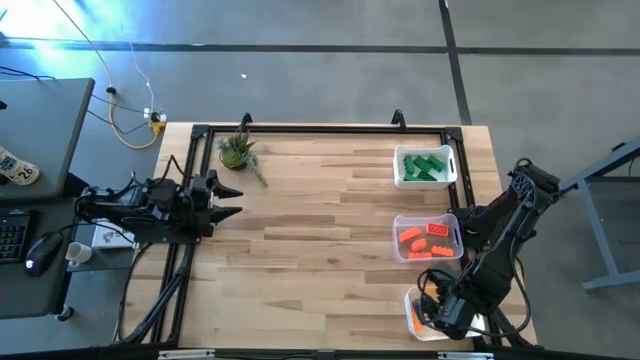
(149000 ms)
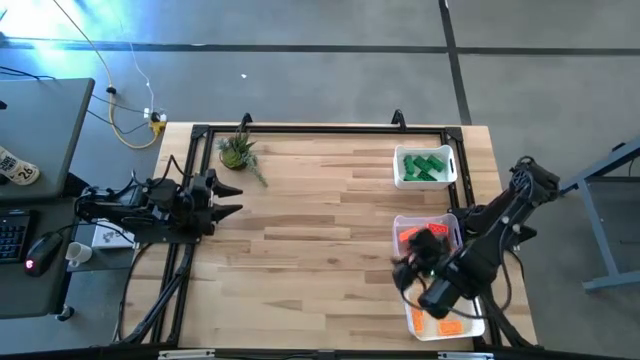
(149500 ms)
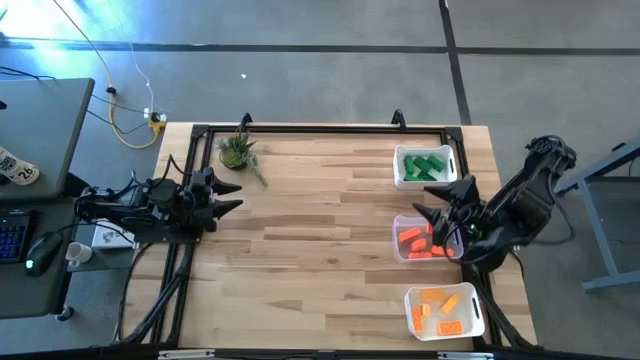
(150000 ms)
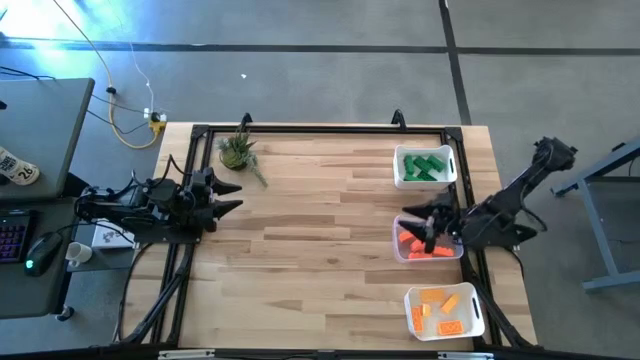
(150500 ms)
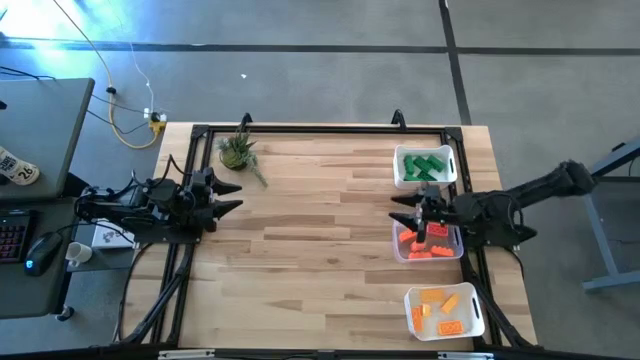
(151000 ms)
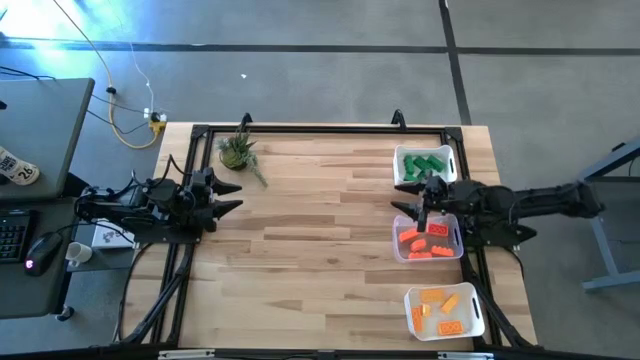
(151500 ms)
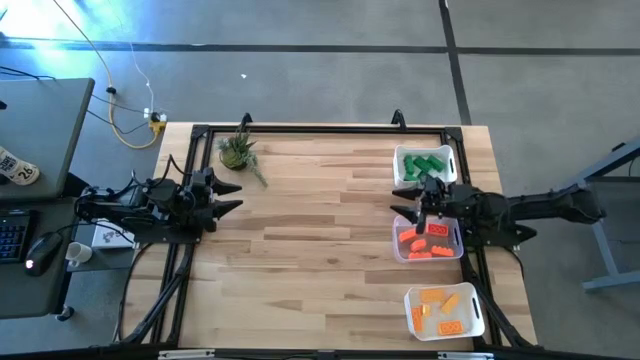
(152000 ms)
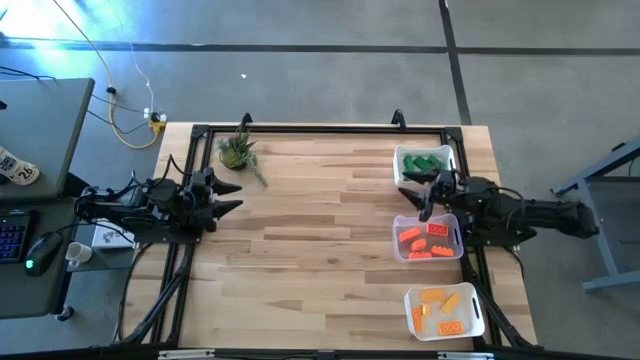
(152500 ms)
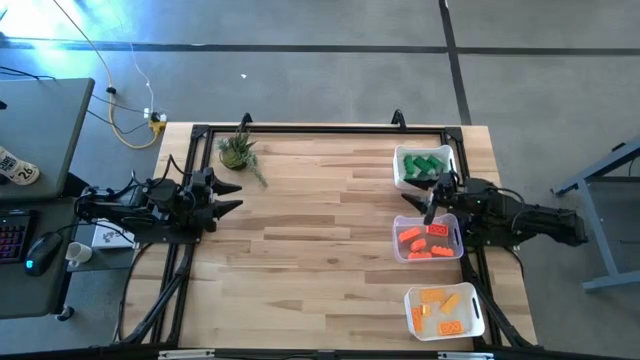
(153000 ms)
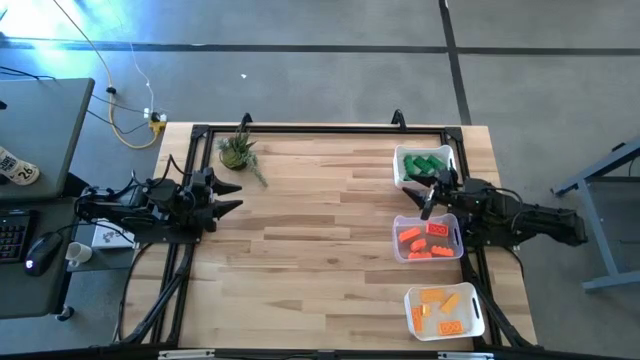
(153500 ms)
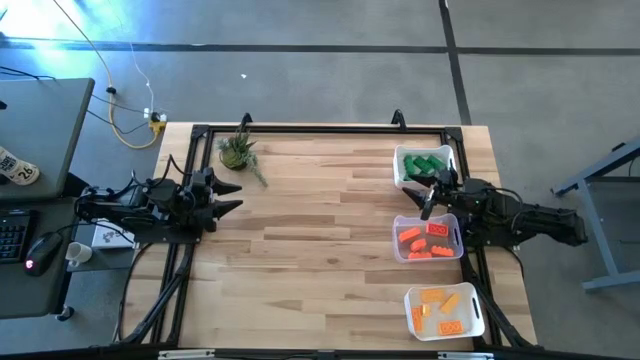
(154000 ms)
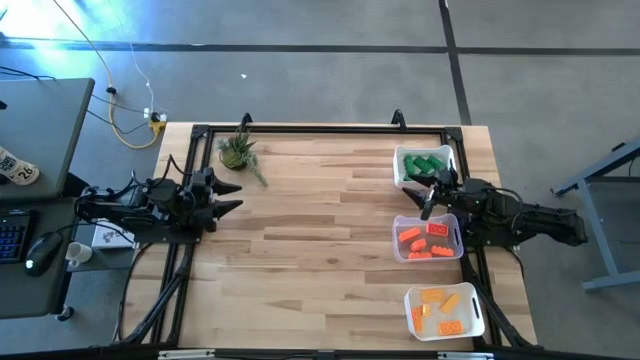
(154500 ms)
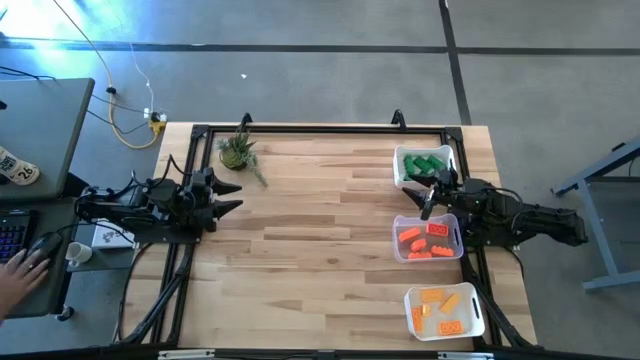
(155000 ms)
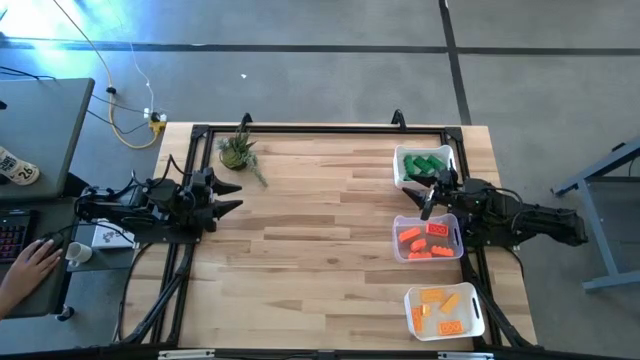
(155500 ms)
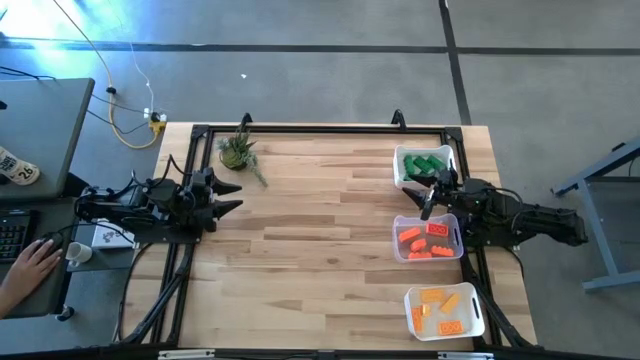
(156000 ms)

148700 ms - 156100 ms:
Task: Sort & place blocks by color
Return to Home Position

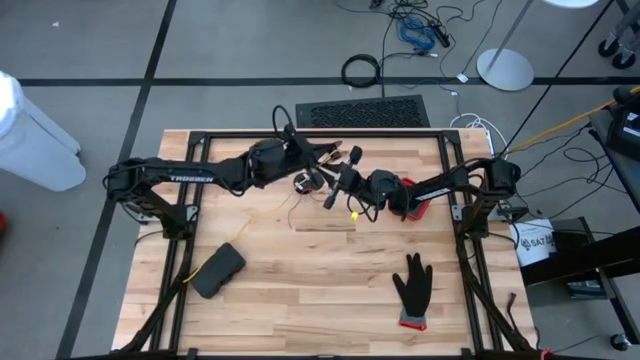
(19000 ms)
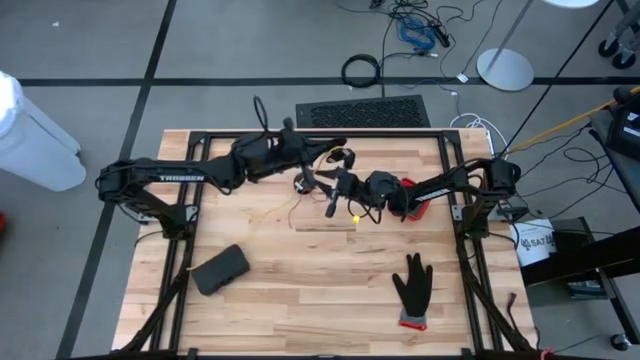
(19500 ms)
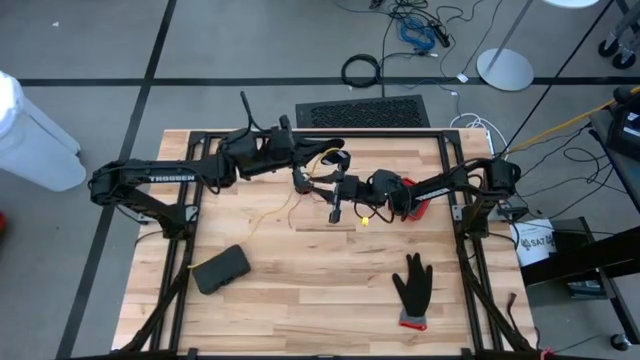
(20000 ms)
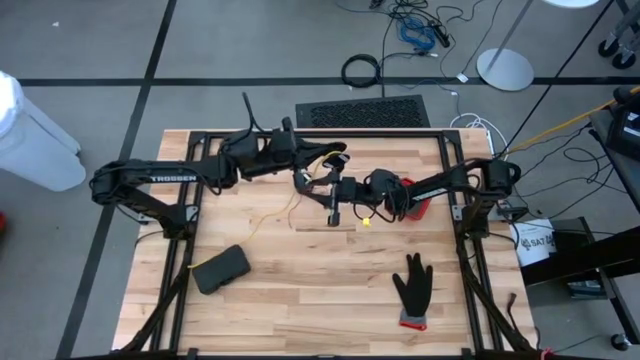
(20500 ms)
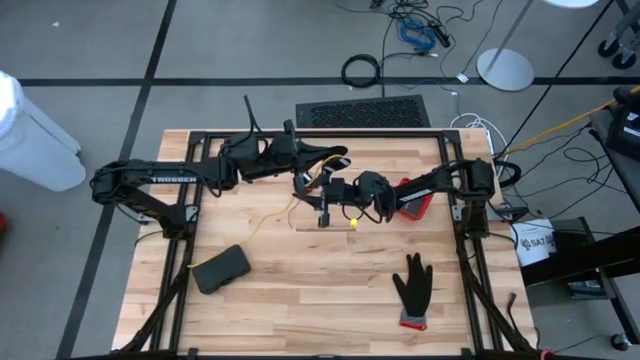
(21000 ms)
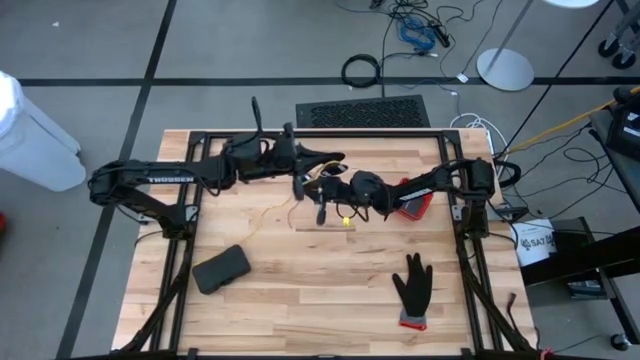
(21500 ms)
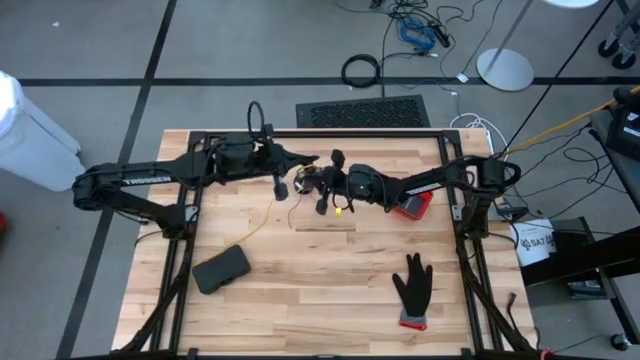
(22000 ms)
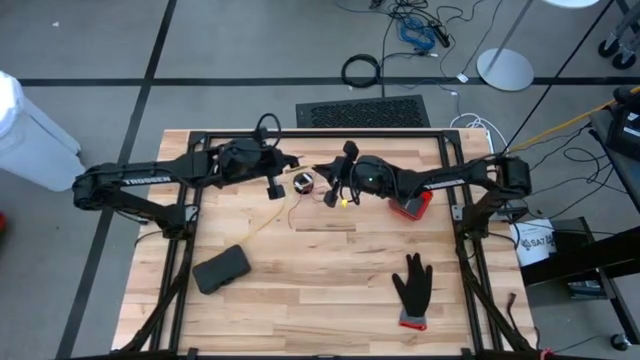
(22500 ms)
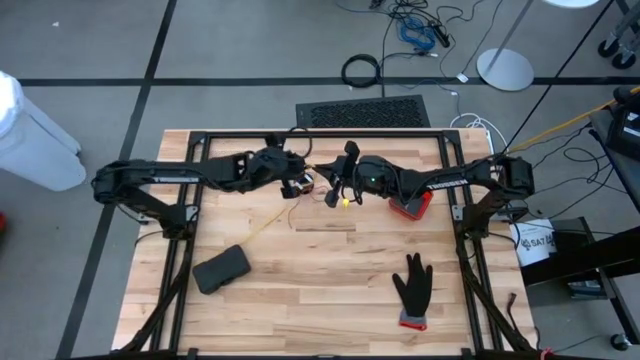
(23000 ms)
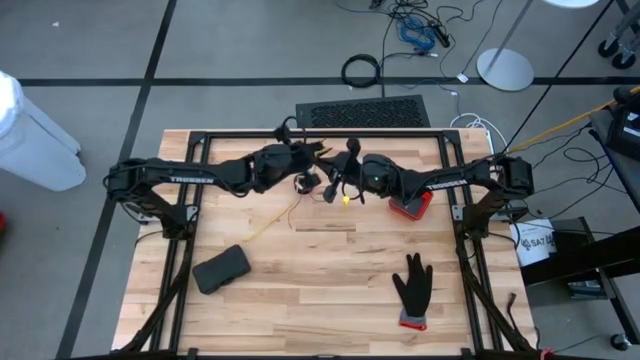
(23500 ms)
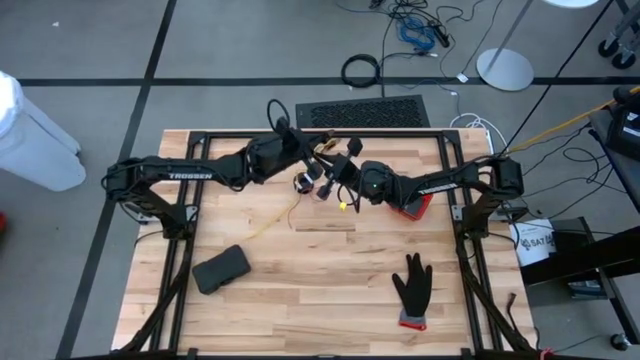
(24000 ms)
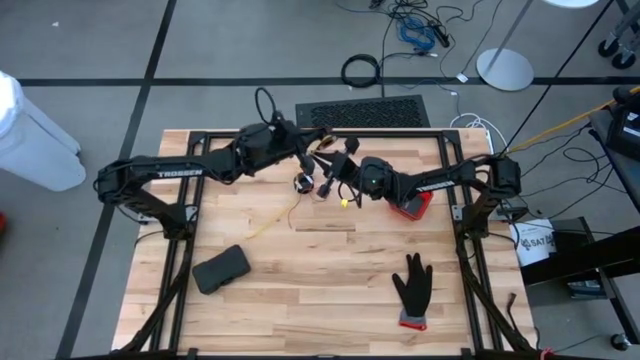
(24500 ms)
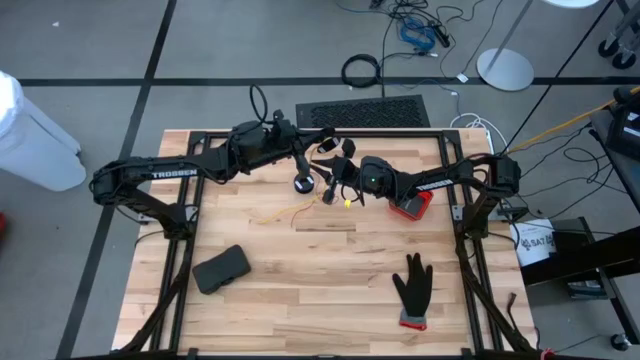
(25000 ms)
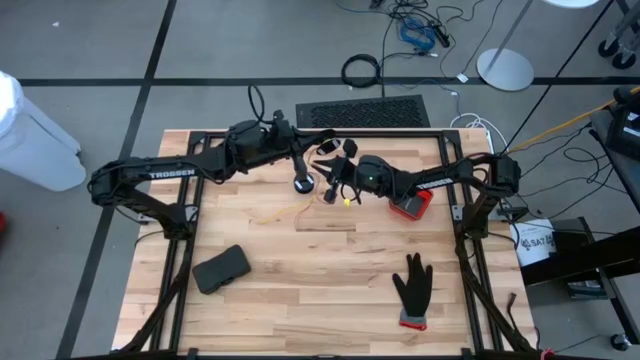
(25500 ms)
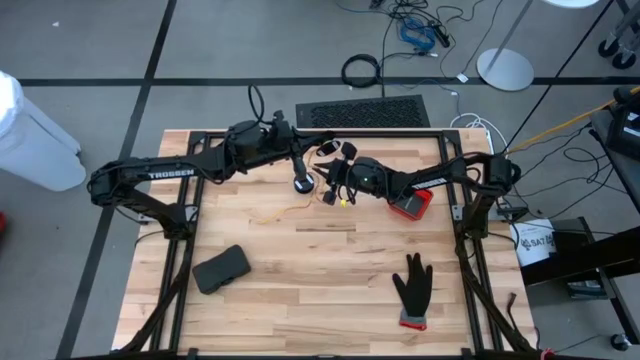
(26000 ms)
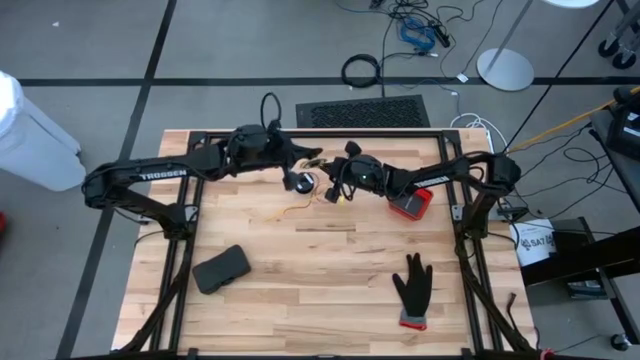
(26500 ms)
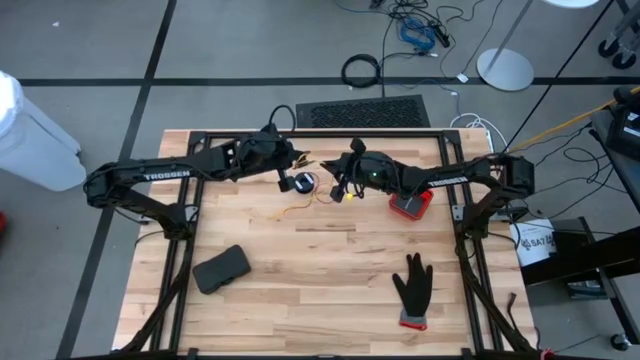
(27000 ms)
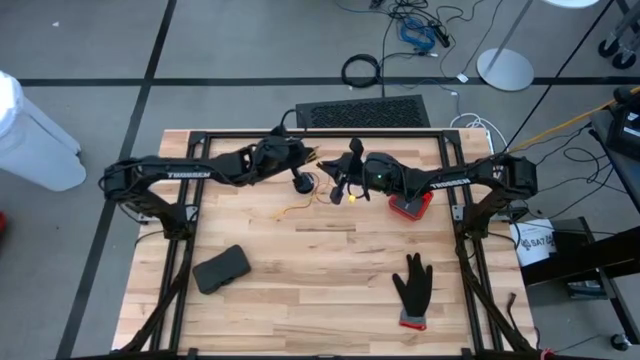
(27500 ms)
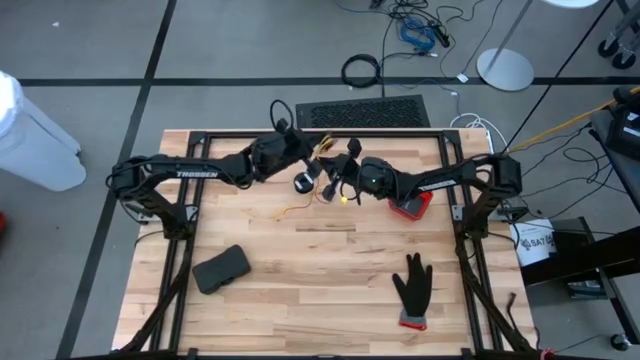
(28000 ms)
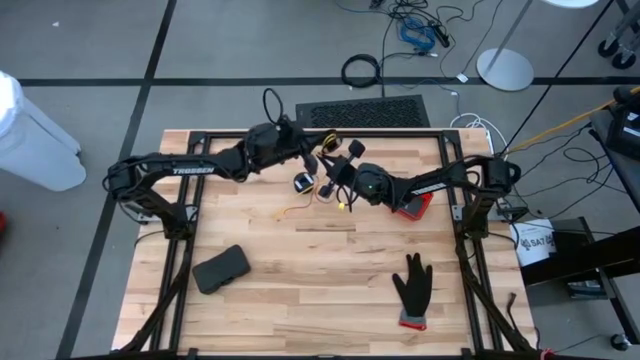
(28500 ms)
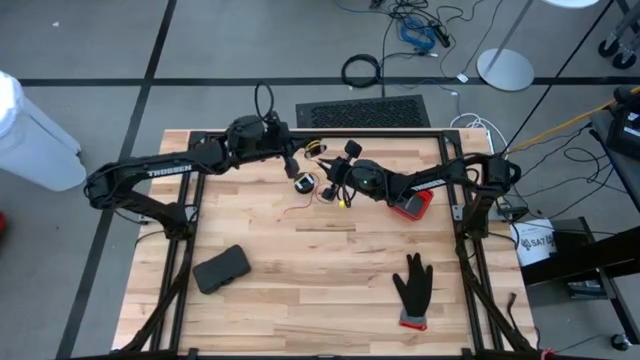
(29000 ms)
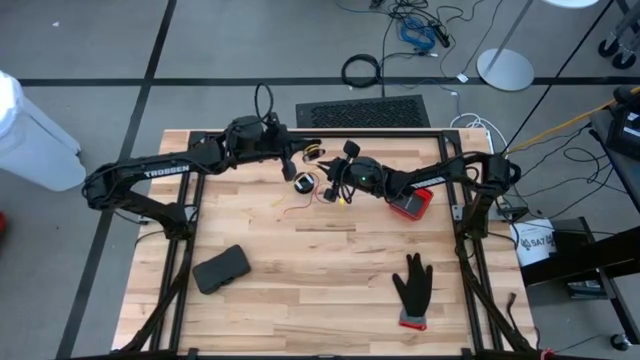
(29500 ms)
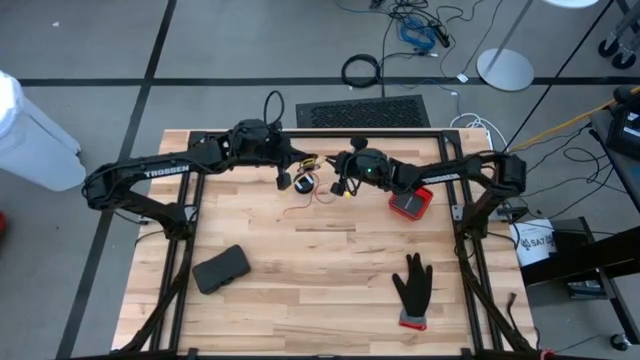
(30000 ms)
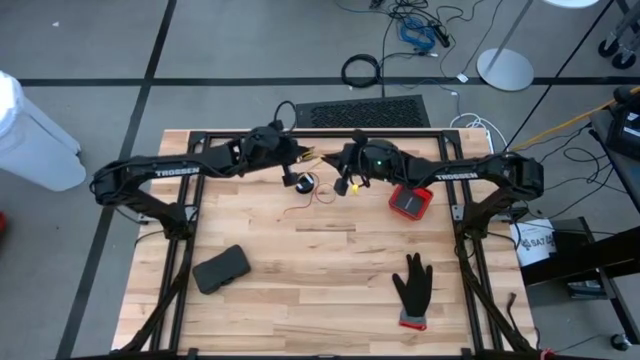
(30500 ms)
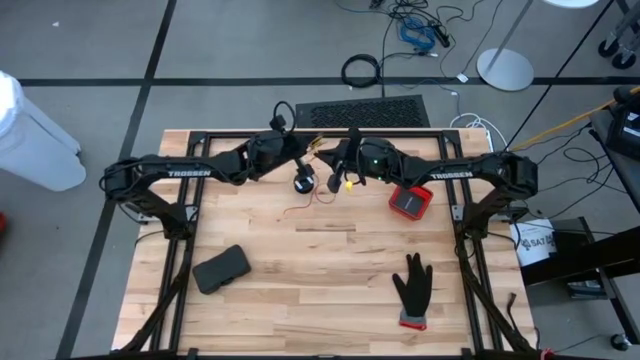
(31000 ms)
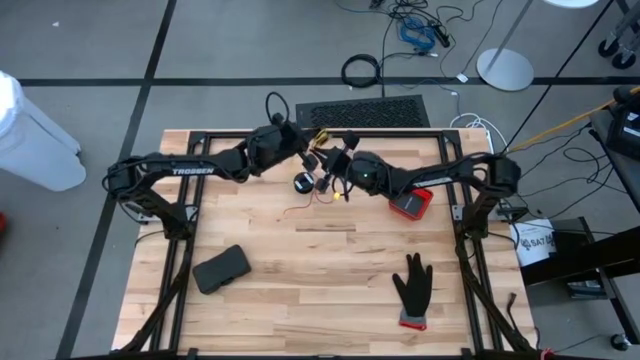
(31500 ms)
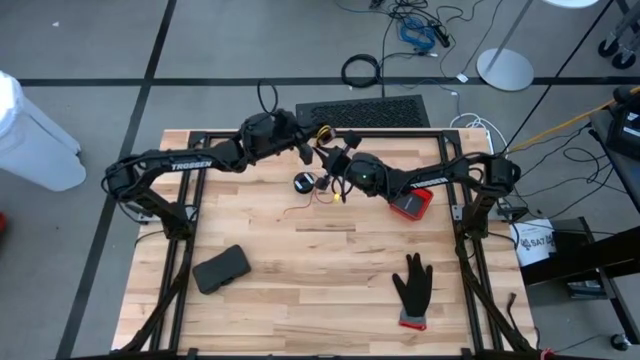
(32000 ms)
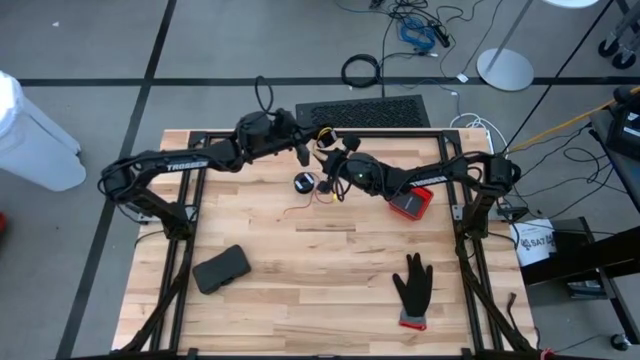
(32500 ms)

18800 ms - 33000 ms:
Task: Coil cords
Coil the yellow wire onto the black spool
